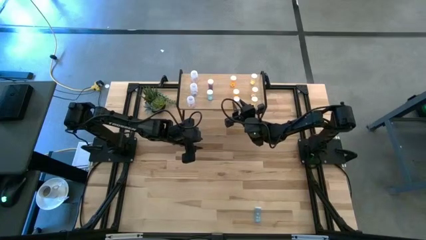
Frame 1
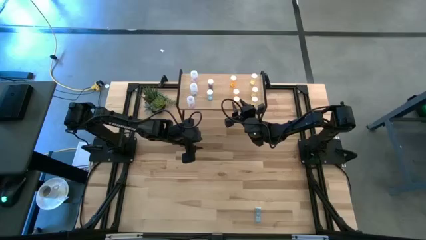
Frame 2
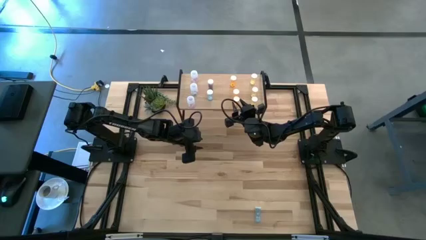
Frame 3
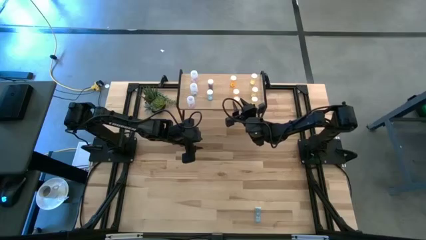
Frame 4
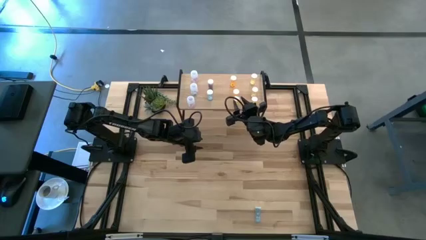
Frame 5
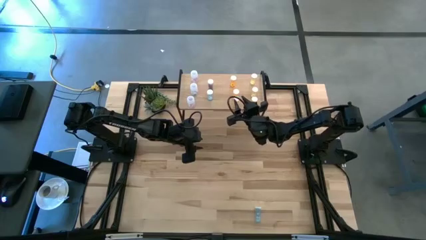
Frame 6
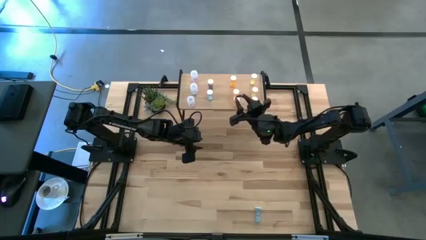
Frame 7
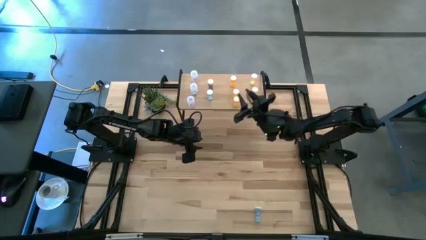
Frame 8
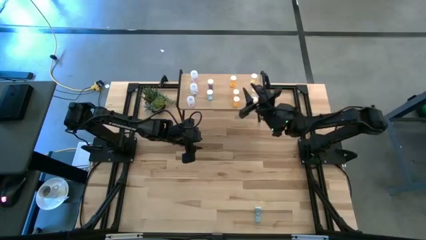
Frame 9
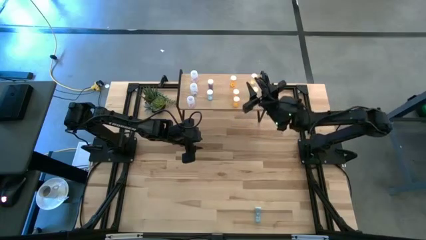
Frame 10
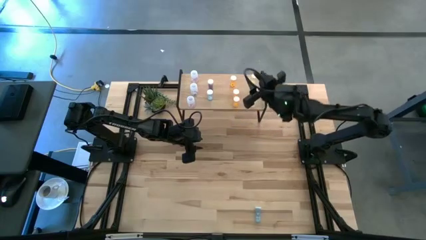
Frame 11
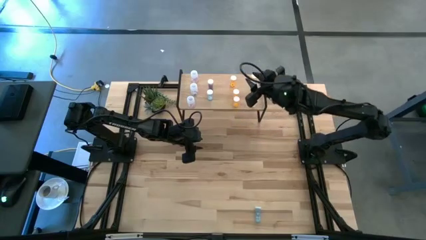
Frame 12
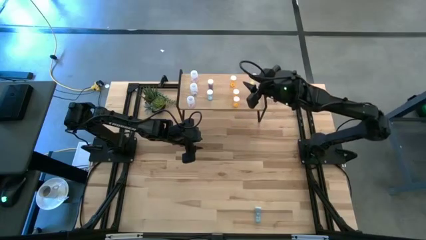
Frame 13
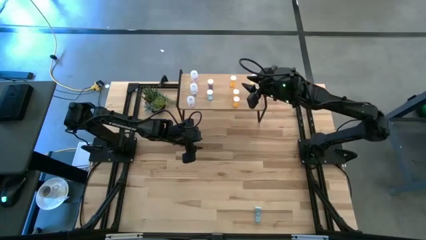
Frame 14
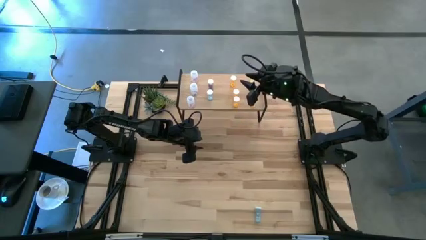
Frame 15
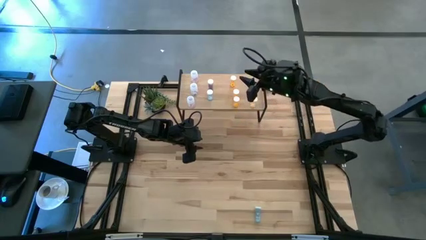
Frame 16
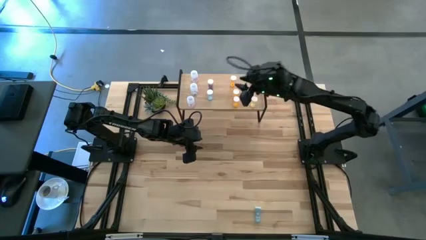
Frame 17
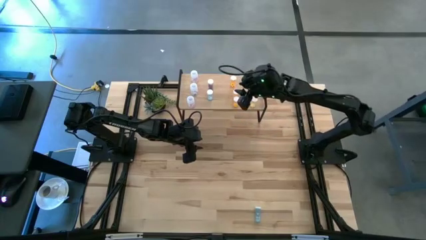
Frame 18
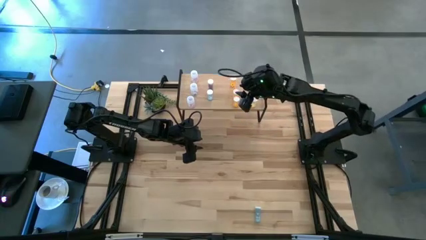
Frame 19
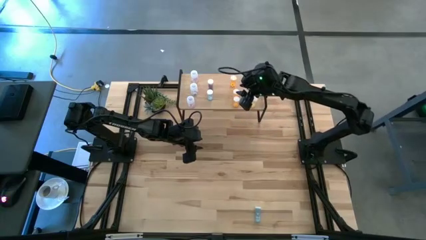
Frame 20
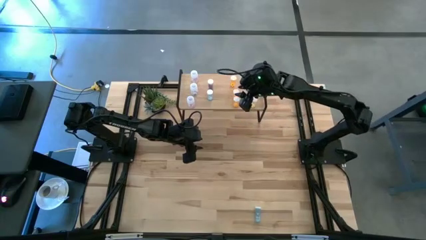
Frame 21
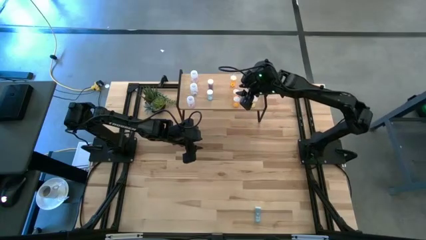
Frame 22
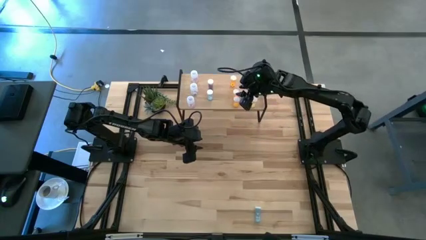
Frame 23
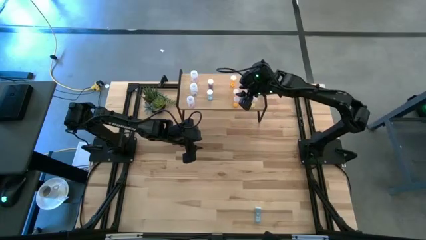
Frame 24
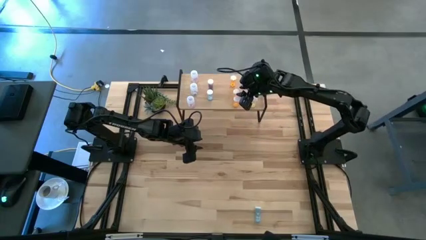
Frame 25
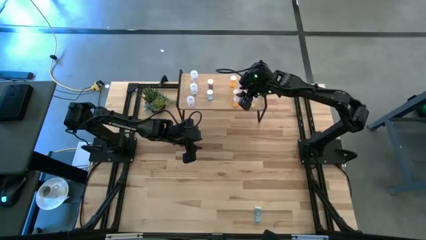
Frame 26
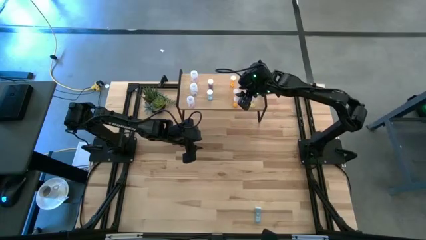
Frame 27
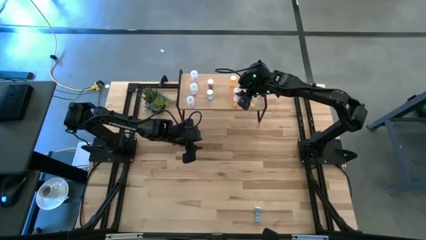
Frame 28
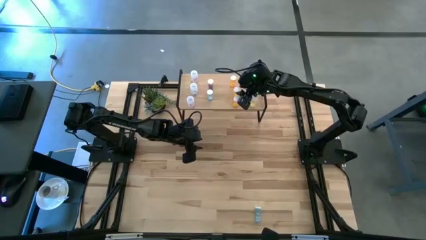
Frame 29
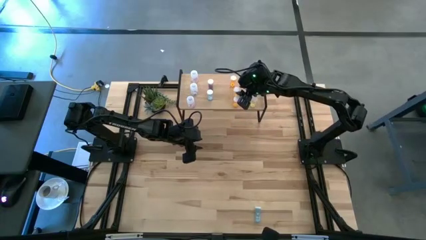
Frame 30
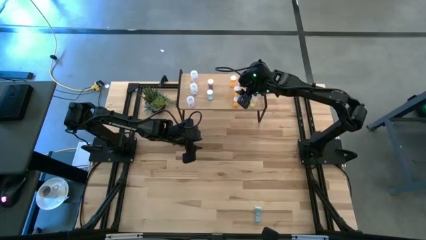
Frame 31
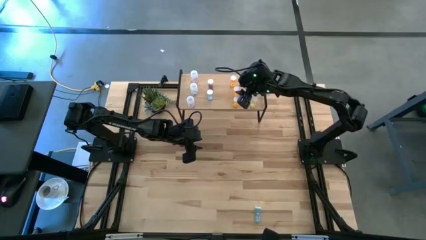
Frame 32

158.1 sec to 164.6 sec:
Task: Pick and place medicine bottles onto shelf by color
Adjust the orange pill bottle on the shelf

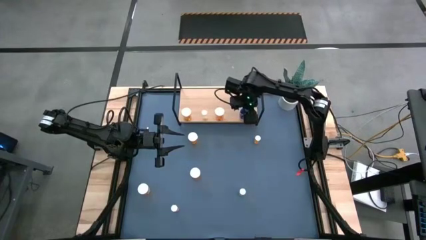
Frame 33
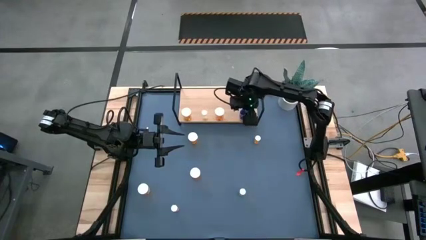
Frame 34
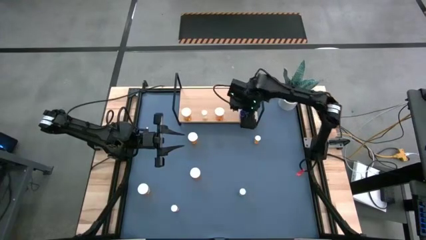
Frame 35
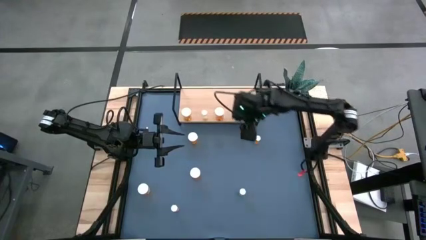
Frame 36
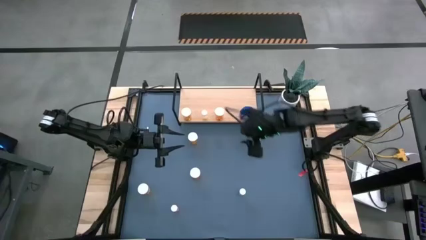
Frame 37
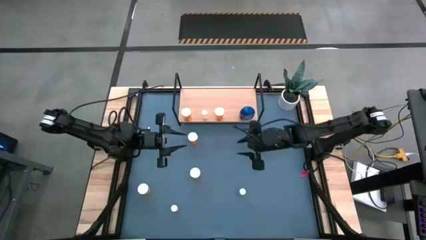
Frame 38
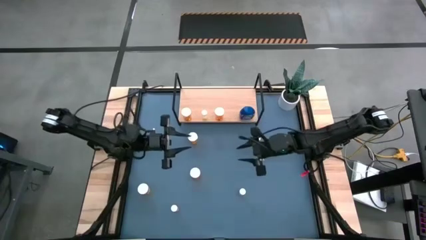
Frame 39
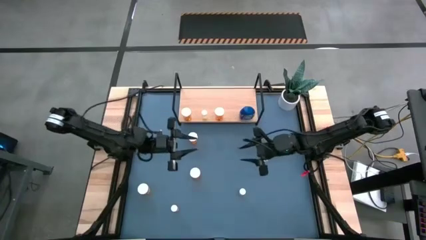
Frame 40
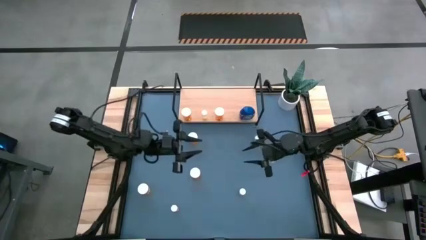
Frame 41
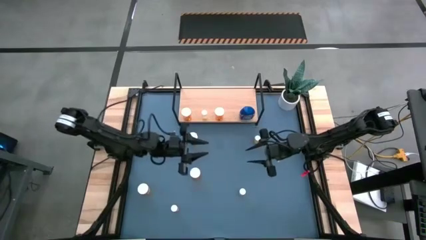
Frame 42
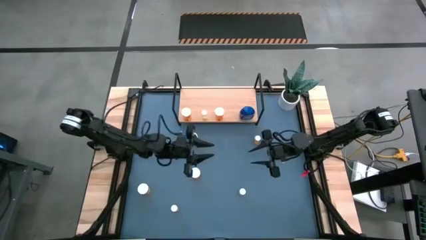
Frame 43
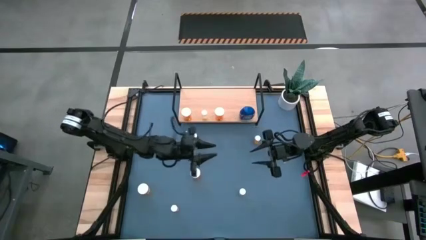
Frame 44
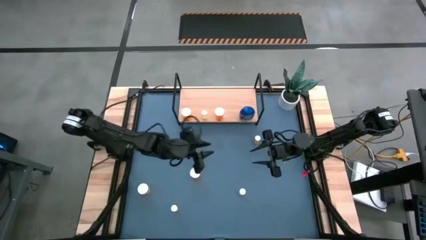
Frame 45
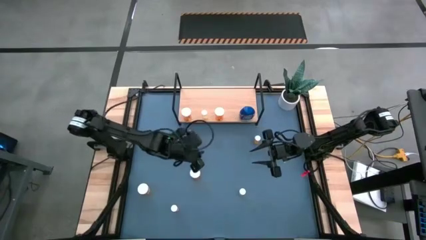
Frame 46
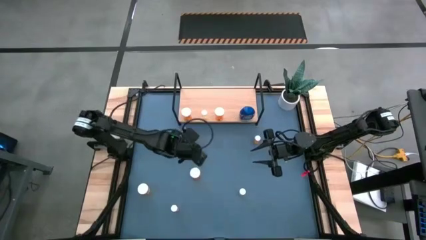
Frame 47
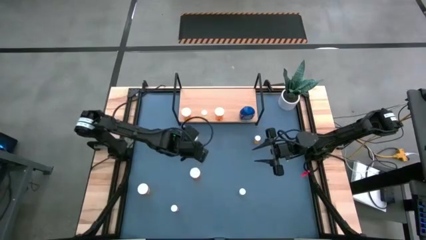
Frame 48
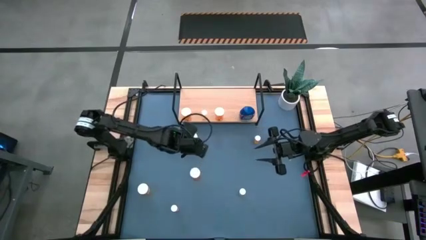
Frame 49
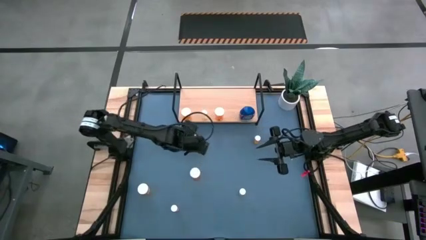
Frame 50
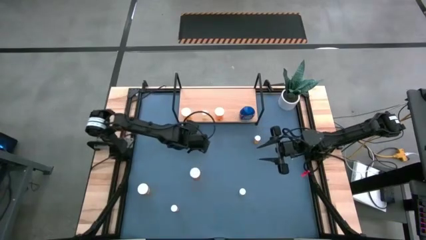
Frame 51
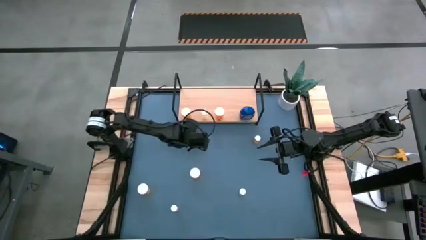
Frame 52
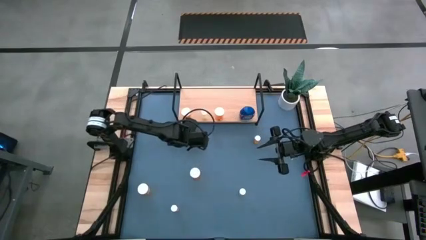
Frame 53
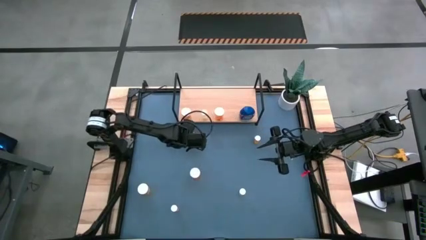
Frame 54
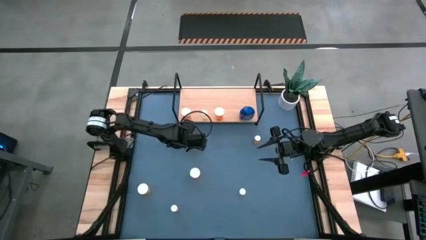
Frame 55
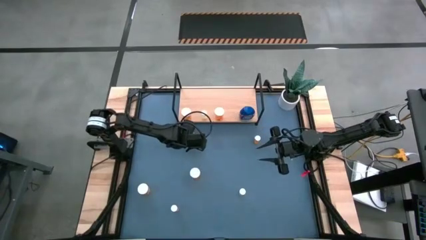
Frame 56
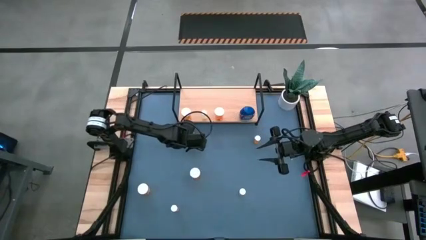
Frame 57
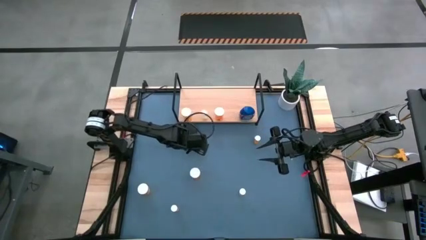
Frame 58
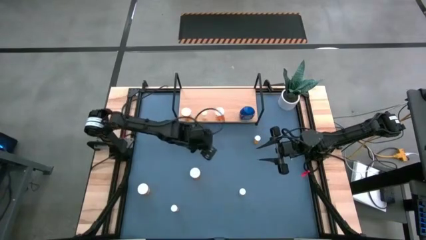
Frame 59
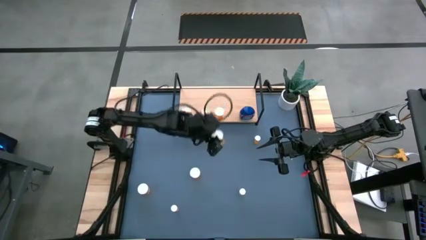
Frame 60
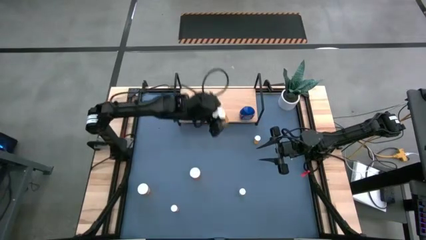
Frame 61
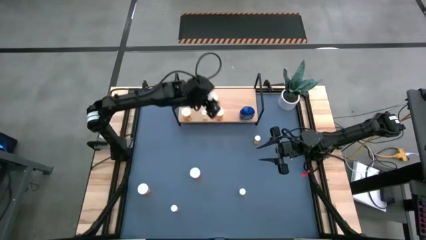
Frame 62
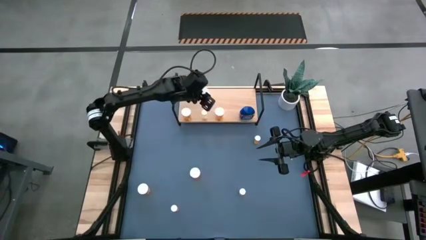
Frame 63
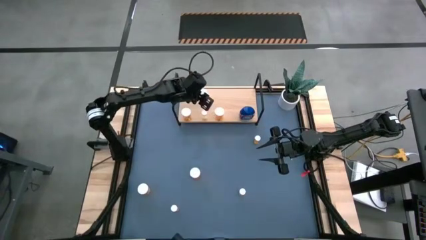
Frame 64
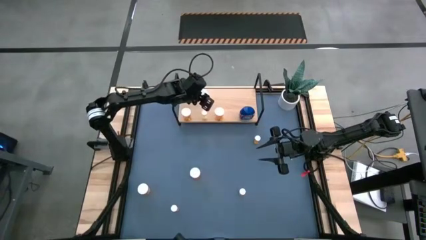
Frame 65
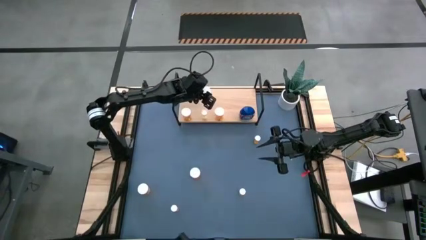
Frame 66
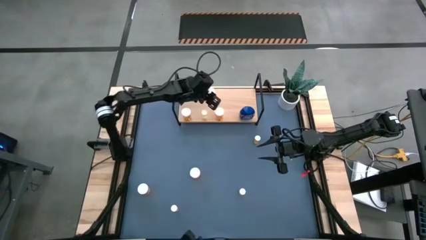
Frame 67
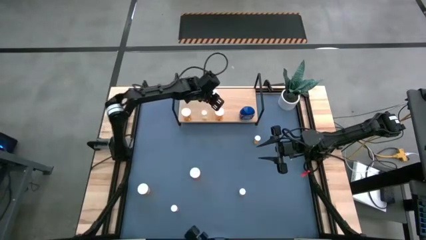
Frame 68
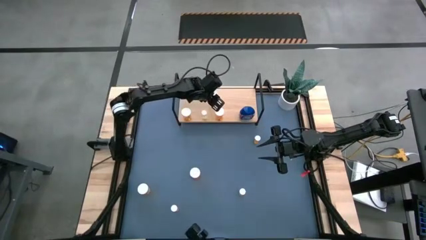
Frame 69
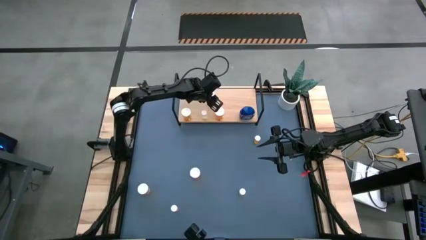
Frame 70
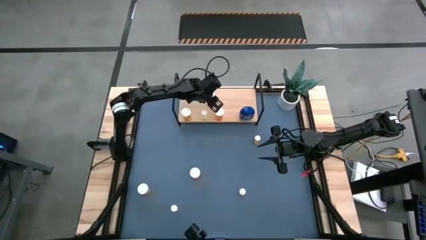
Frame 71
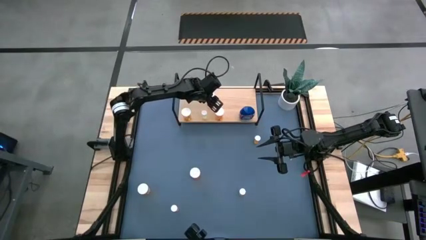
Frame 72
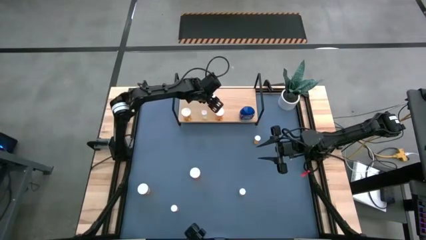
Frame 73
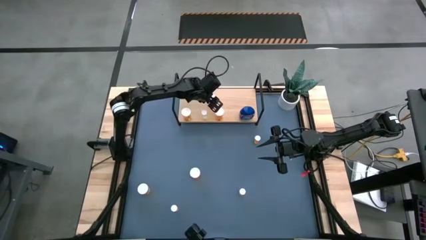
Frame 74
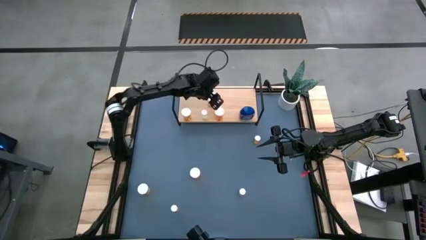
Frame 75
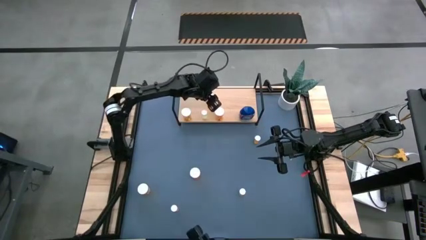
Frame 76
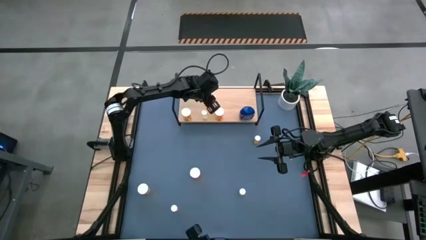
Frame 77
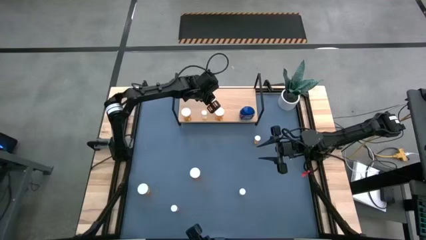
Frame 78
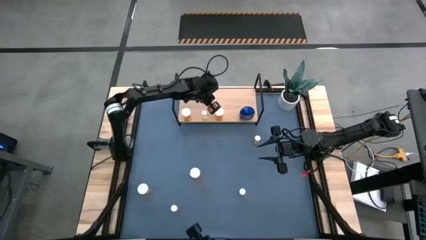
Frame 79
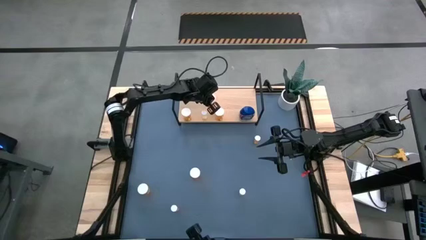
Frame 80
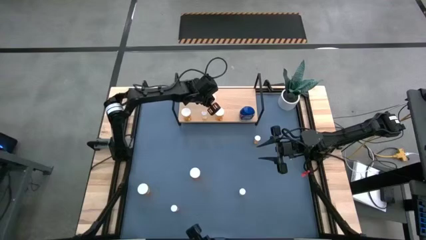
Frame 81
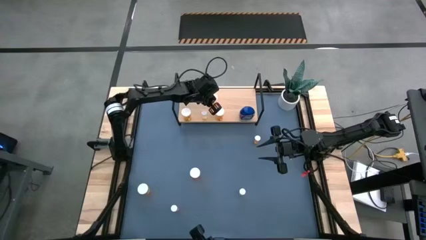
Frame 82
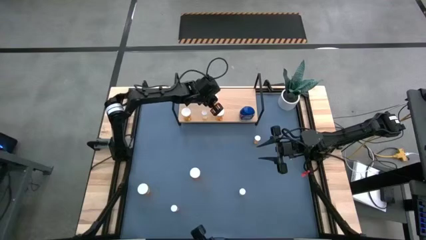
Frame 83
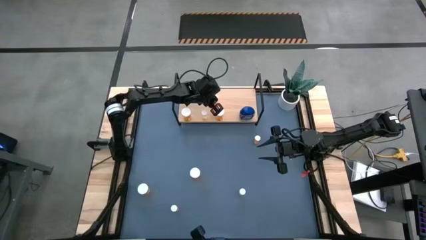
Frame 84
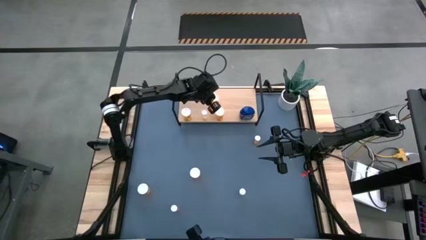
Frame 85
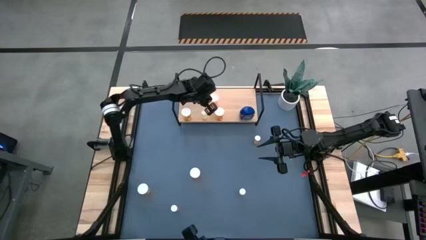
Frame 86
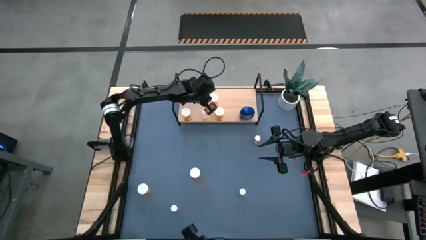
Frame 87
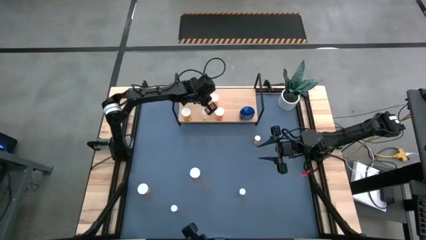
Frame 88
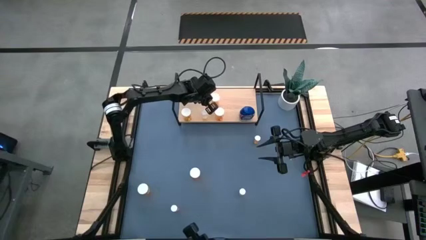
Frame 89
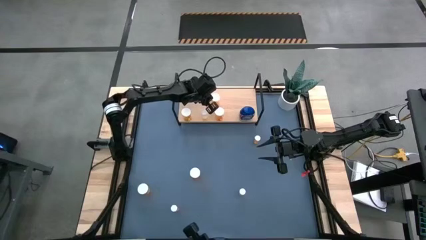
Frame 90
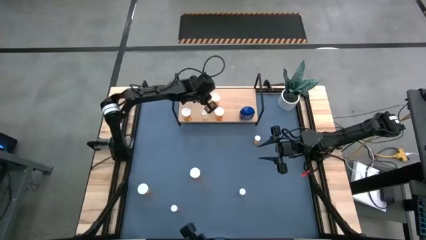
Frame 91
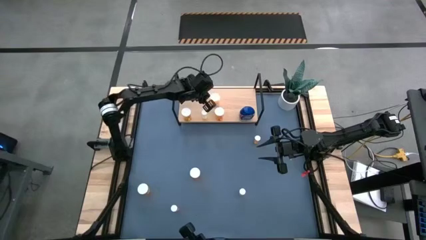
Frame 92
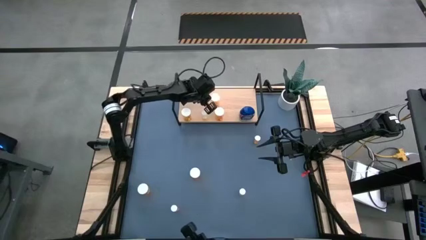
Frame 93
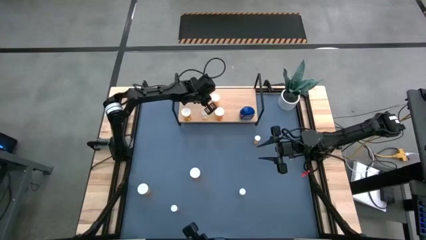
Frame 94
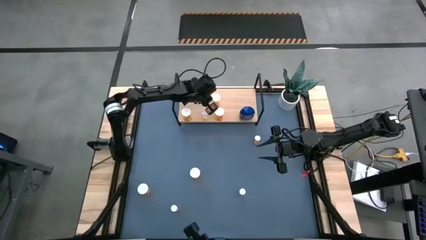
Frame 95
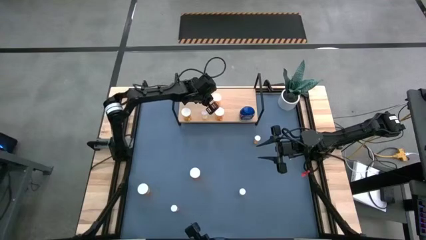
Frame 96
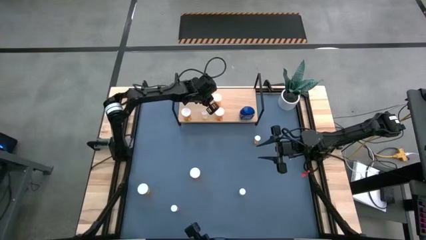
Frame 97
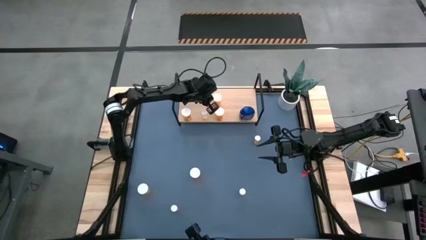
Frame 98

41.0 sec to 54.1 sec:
Task: Pick and place medicine bottles onto shelf by color
Put the orange pill bottle on the shelf
